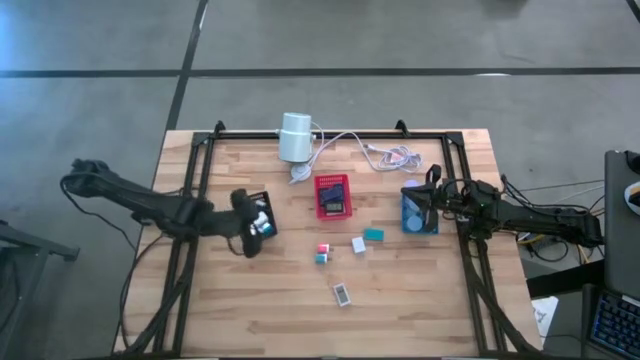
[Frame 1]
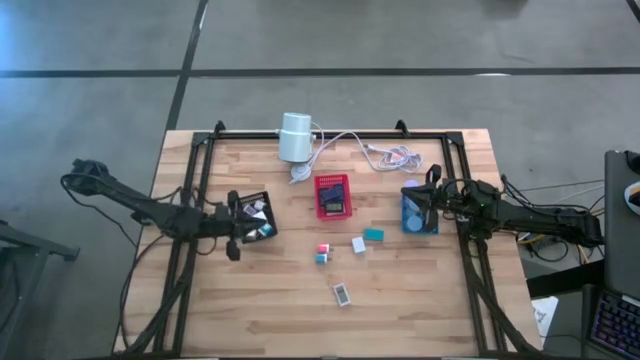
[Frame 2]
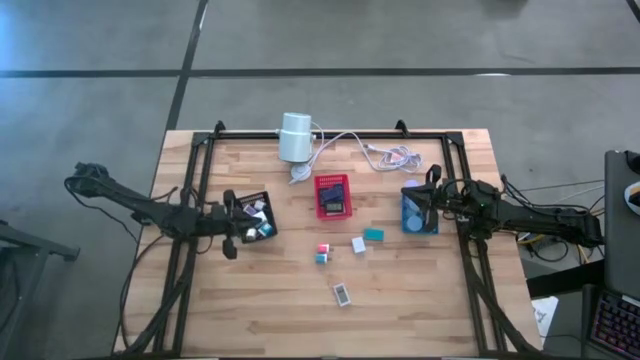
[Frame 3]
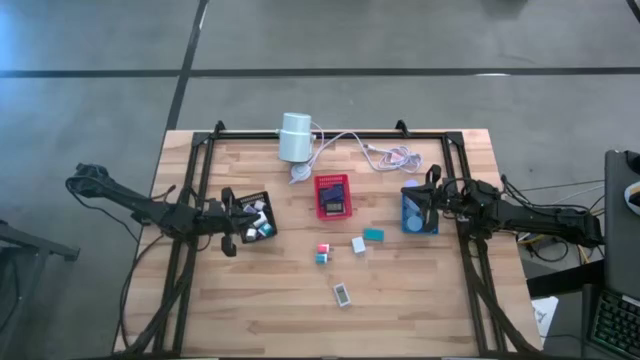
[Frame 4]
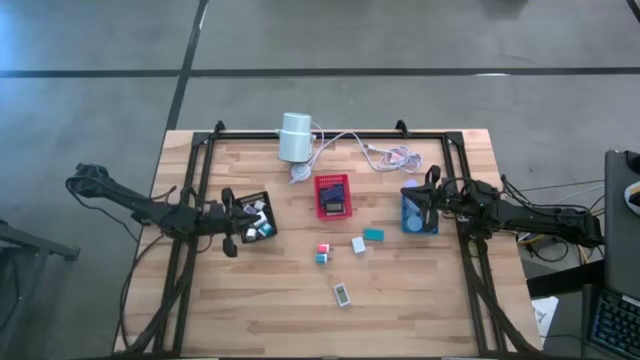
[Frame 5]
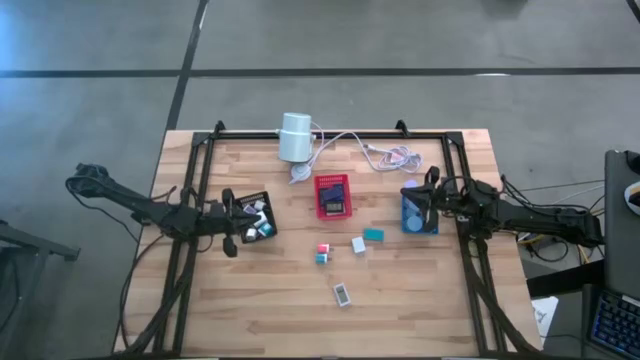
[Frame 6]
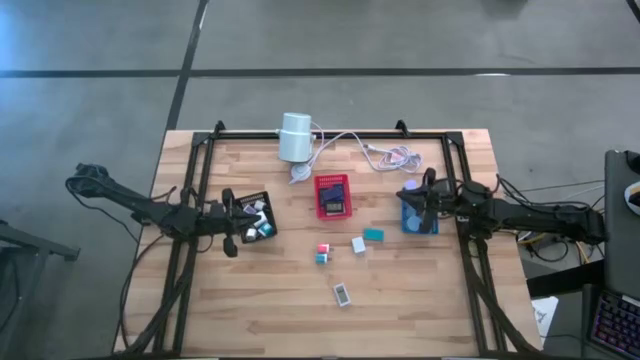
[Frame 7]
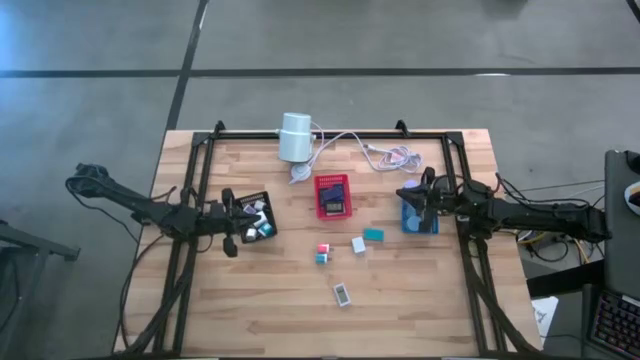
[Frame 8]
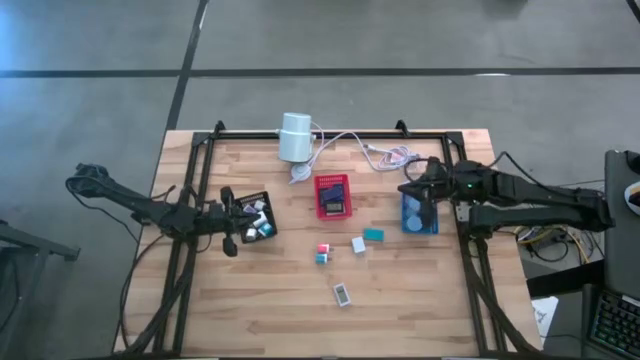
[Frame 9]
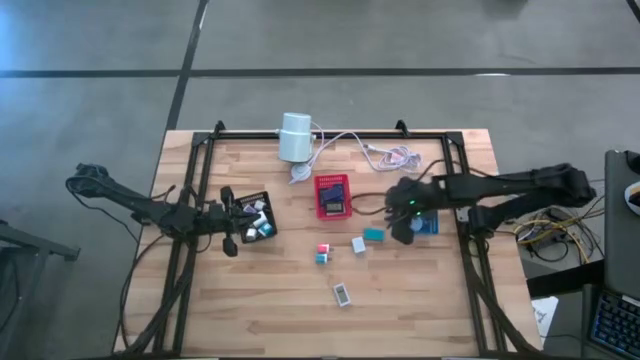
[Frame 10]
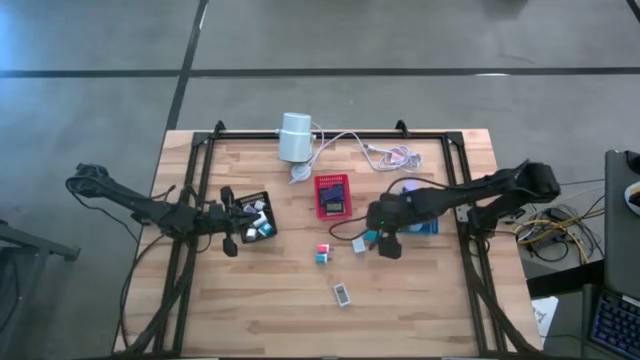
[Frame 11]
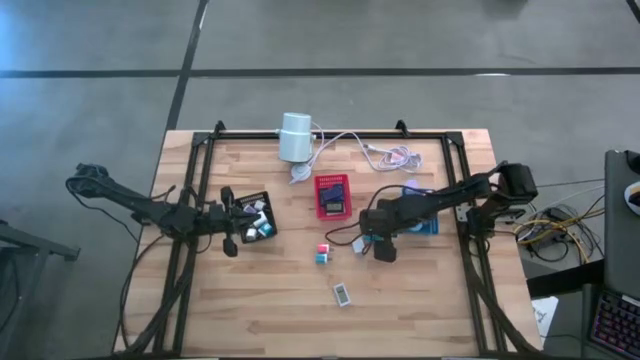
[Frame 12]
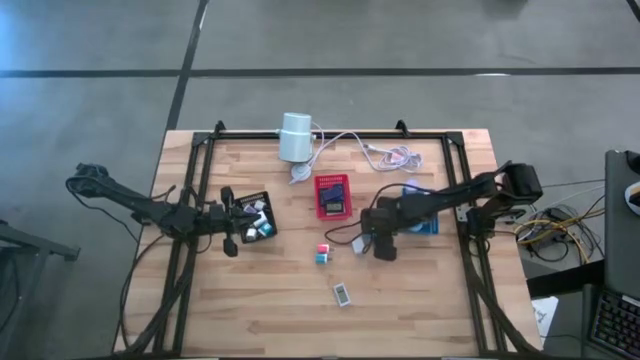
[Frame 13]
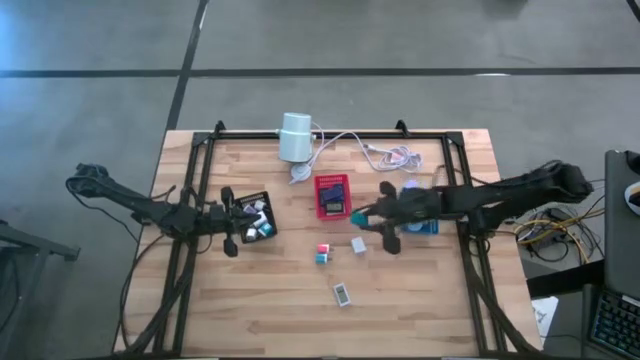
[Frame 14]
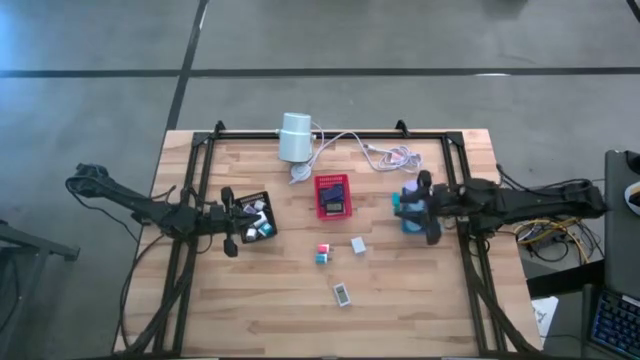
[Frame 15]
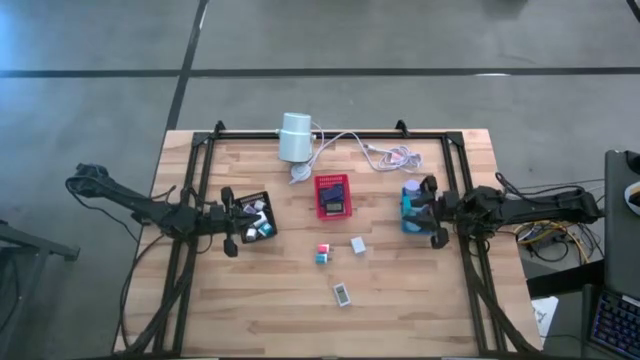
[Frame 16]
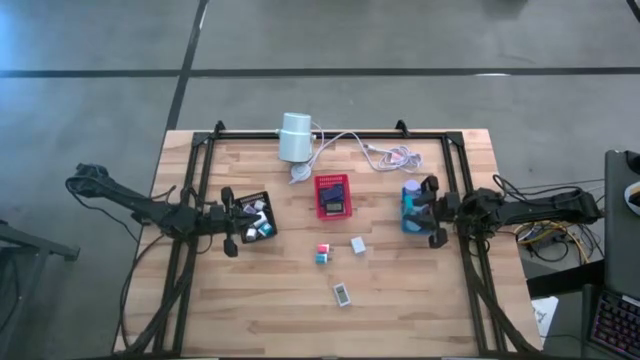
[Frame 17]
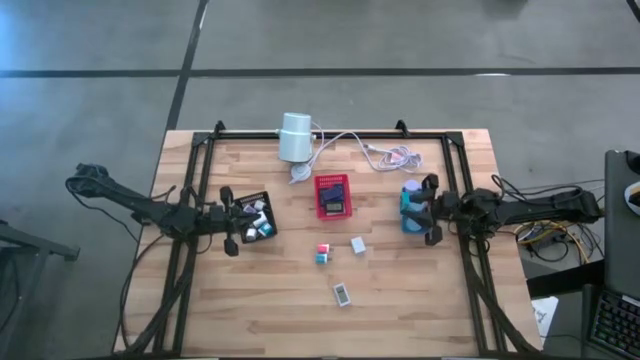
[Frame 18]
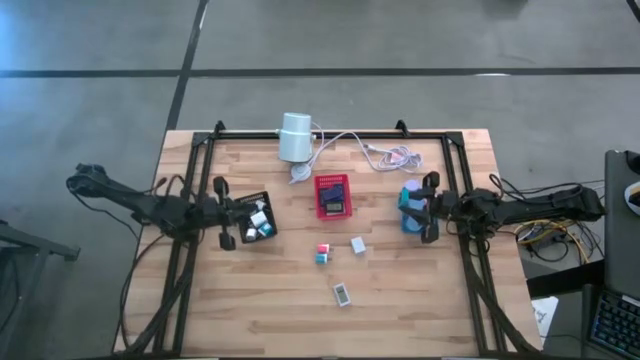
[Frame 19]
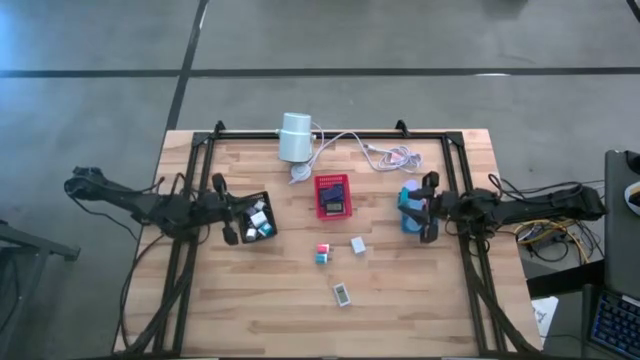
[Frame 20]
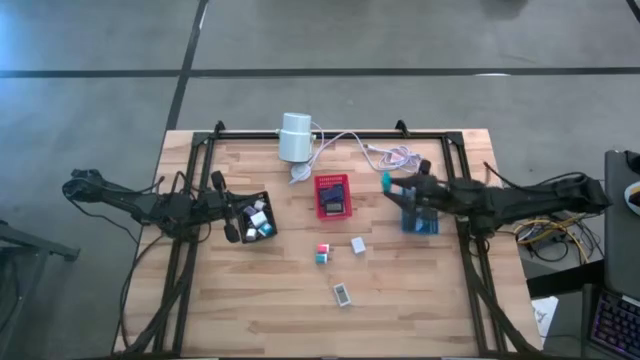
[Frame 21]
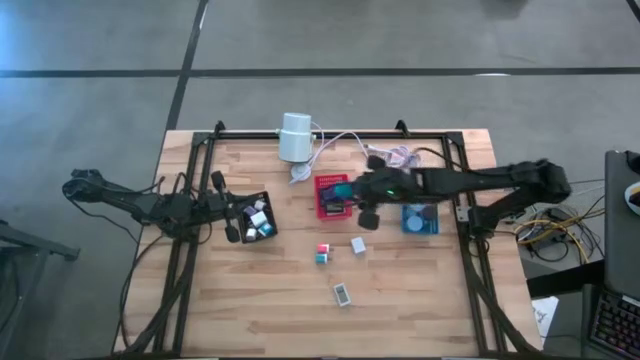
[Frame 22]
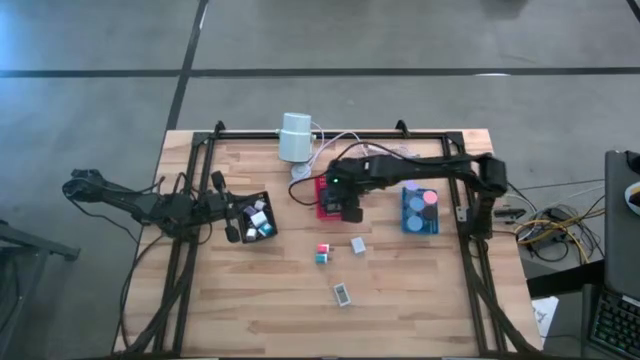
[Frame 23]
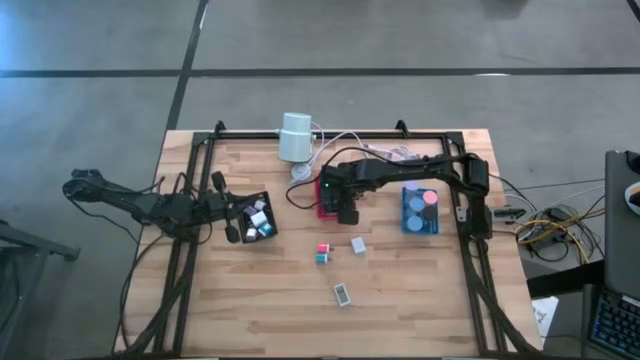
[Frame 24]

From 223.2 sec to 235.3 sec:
Task: Pick & Place Office items
Put the light blue digital clock into the red basket

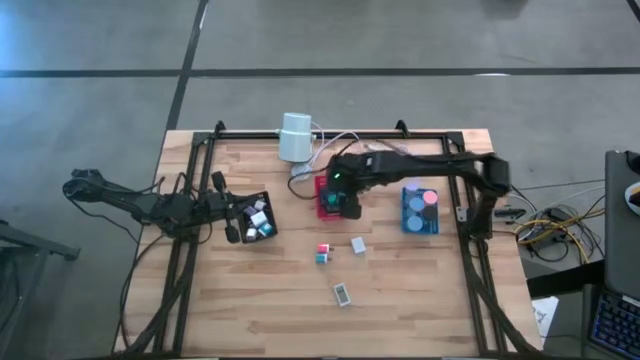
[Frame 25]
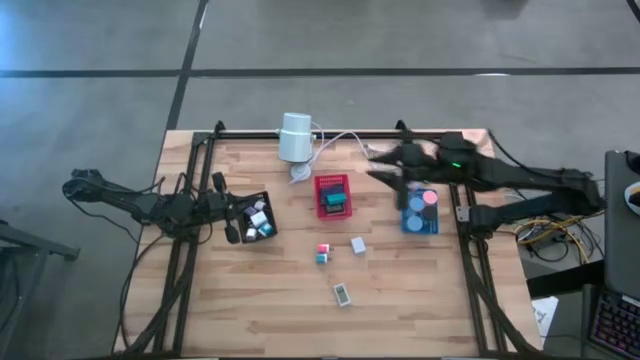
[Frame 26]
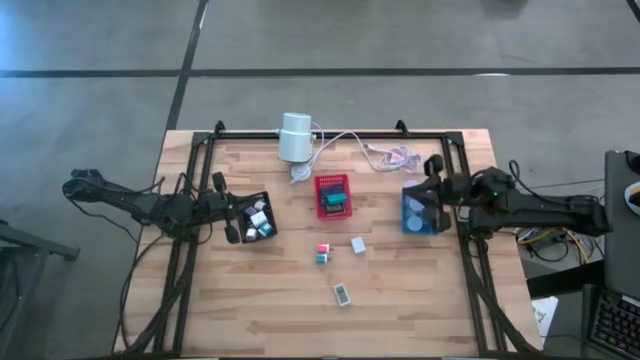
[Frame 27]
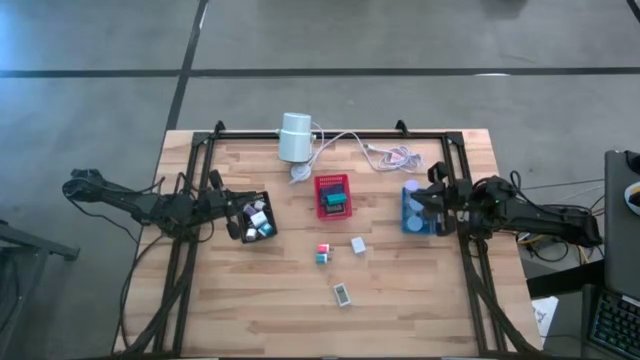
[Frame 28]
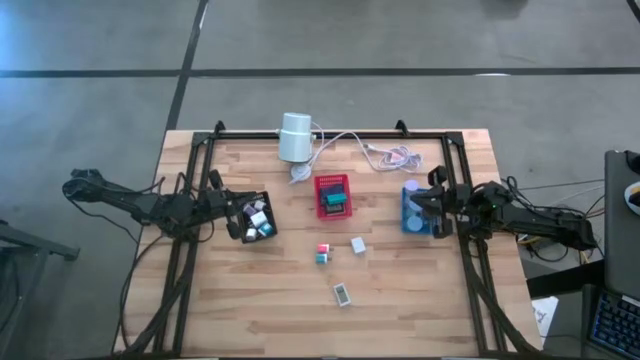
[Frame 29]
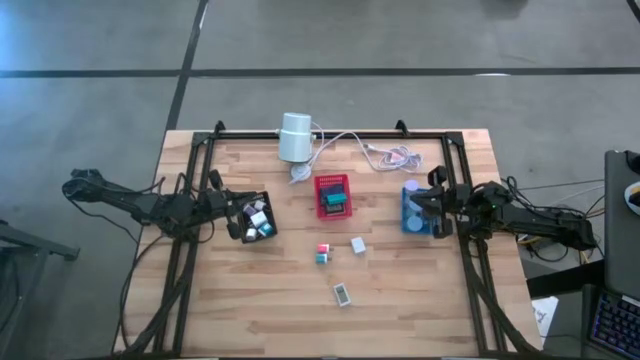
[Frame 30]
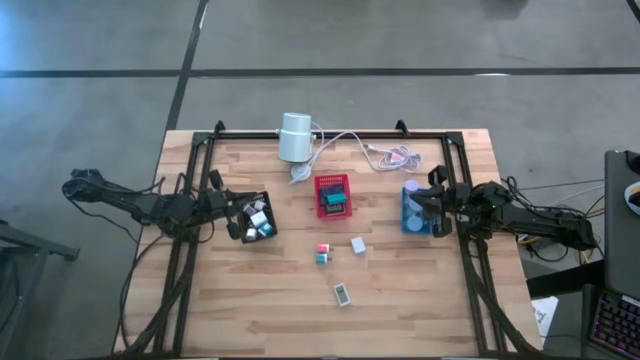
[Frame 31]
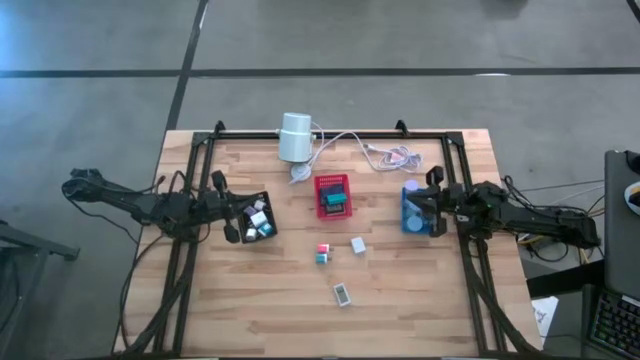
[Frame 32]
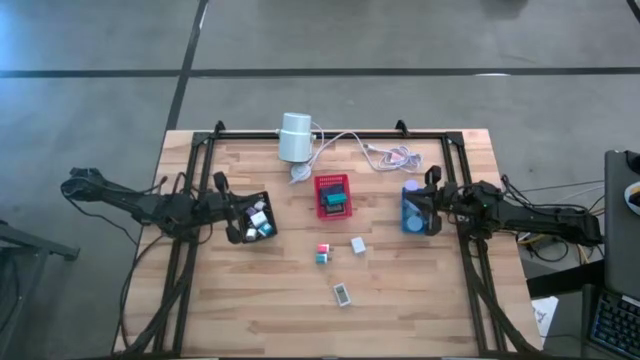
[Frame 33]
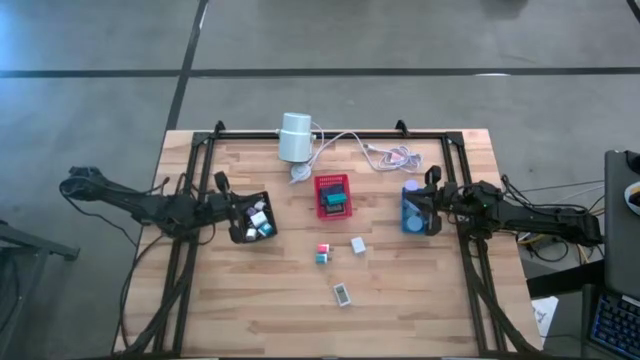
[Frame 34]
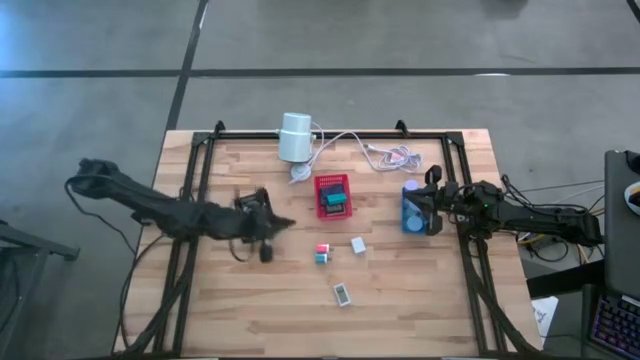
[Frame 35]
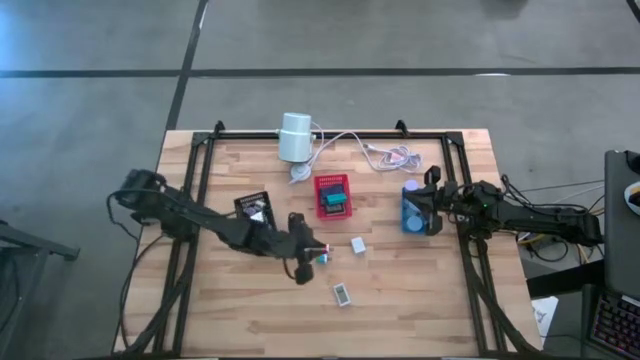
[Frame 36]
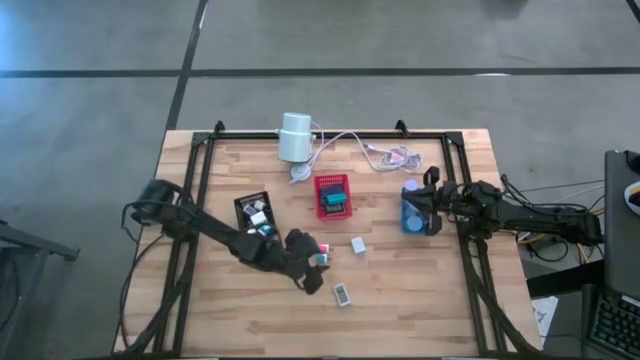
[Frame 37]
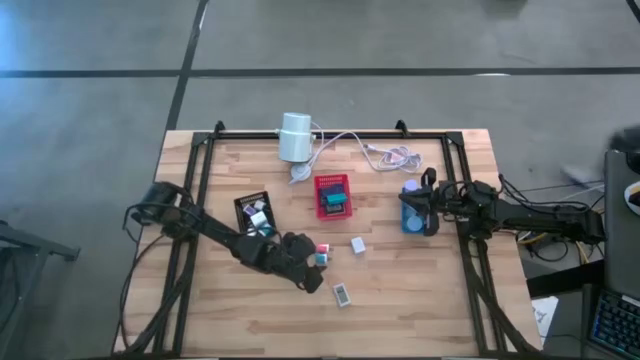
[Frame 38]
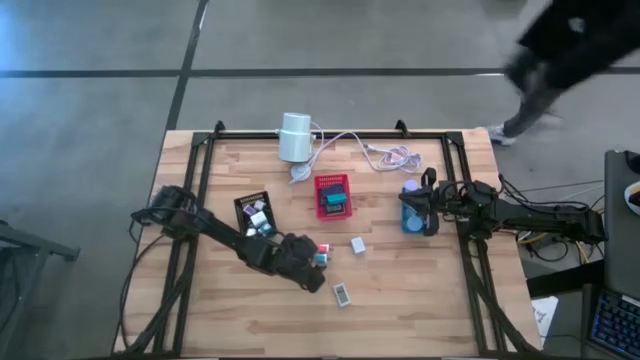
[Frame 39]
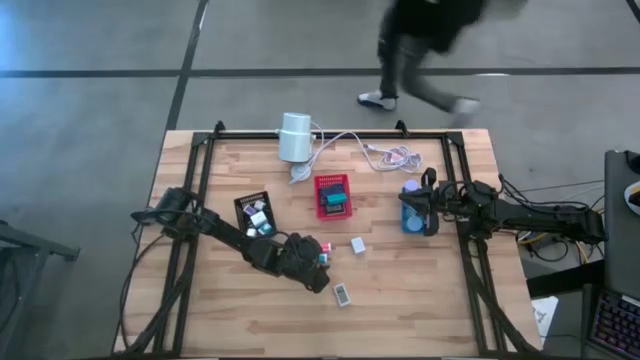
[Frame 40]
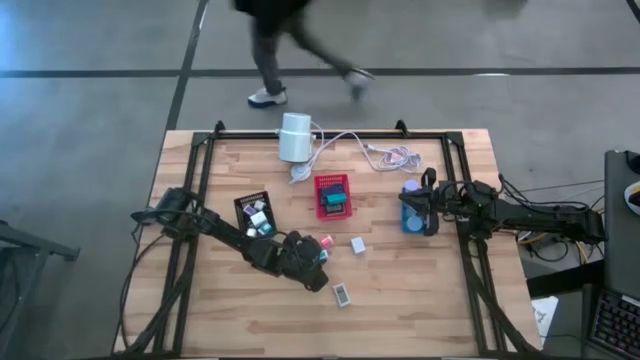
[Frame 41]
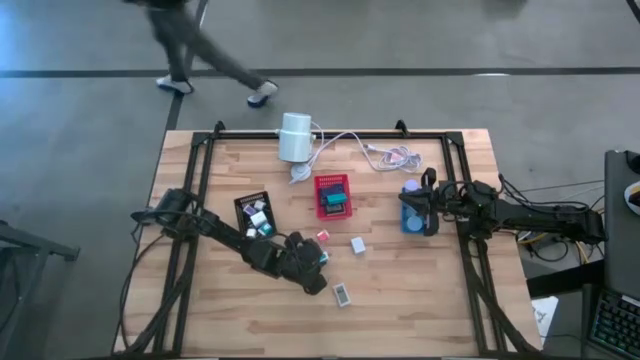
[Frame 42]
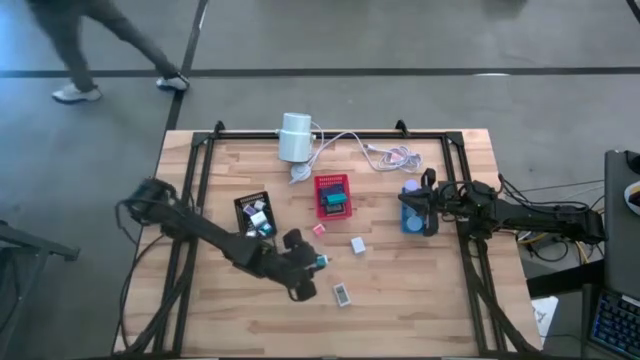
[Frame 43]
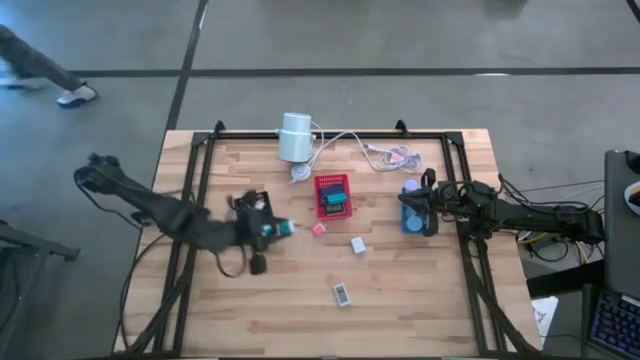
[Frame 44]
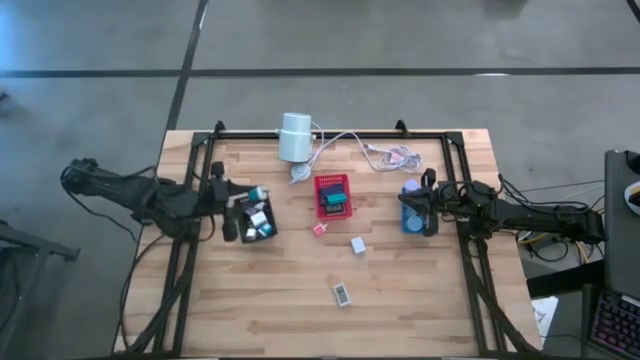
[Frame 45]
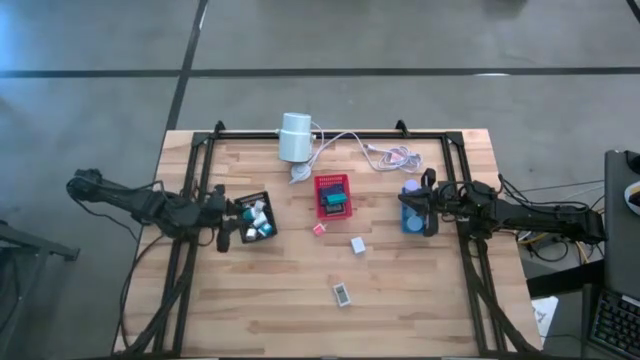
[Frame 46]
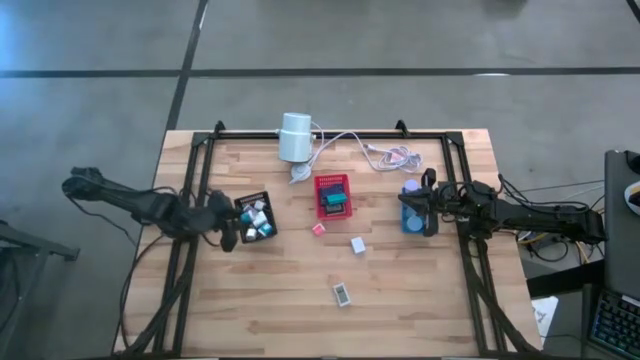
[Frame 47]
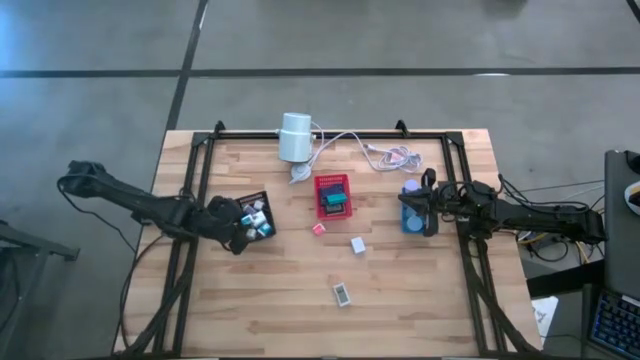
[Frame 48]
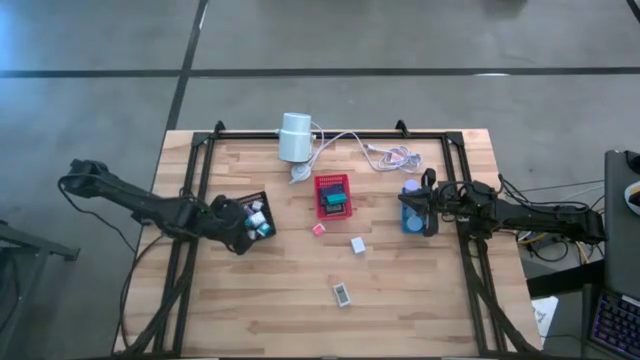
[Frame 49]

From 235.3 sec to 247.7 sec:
Put the blue charger adapter into the black basket
